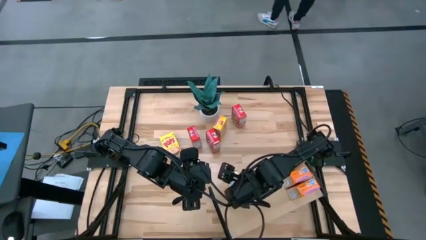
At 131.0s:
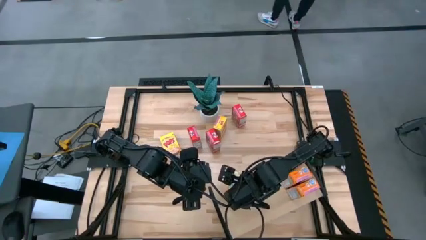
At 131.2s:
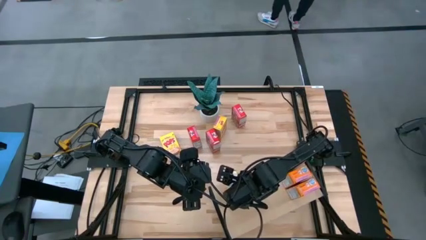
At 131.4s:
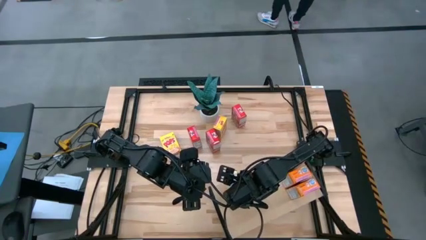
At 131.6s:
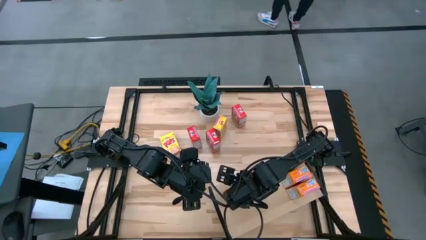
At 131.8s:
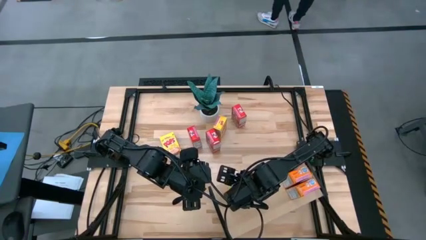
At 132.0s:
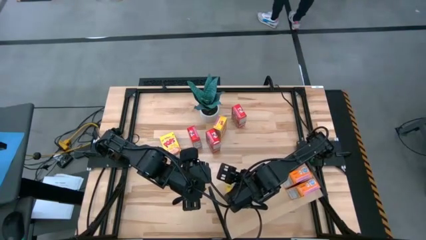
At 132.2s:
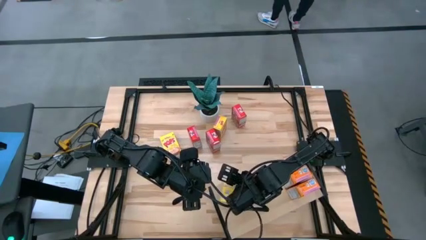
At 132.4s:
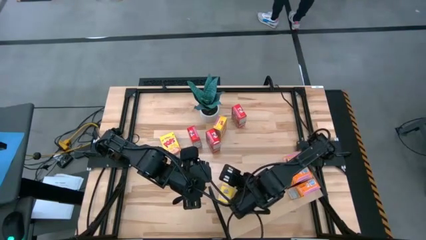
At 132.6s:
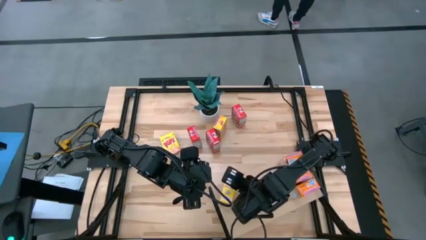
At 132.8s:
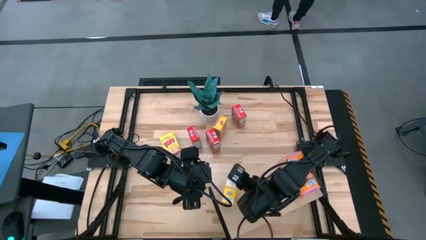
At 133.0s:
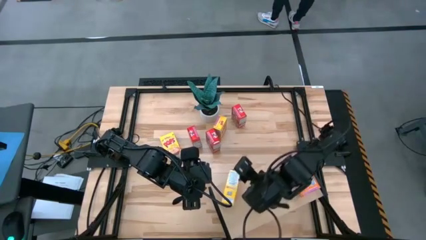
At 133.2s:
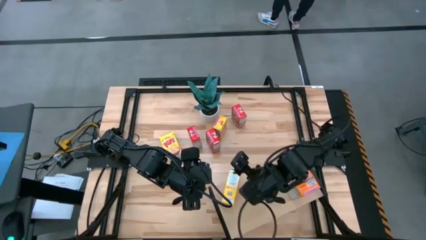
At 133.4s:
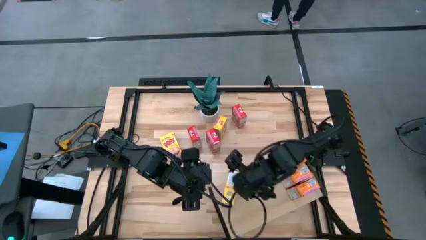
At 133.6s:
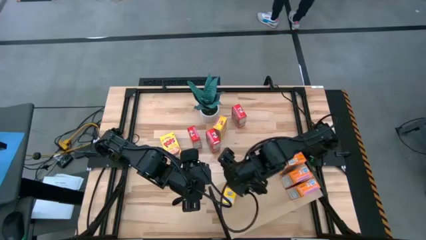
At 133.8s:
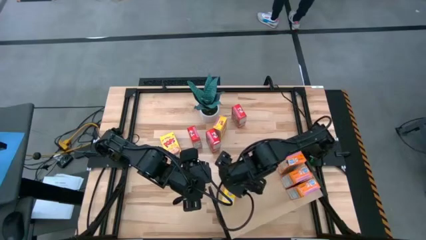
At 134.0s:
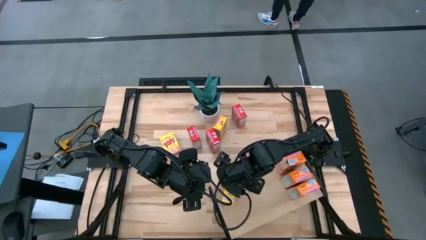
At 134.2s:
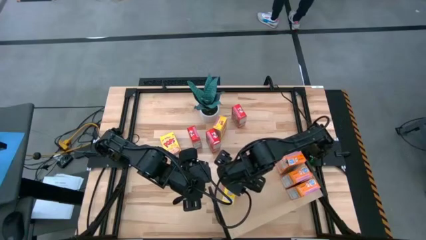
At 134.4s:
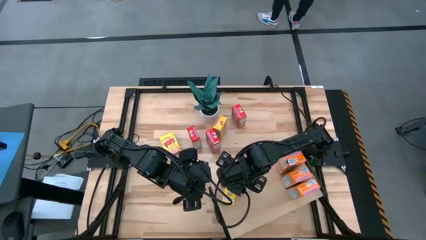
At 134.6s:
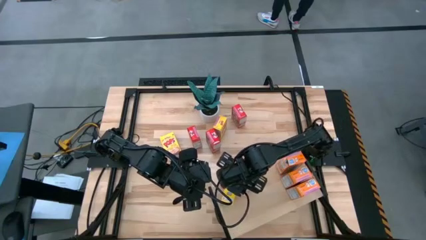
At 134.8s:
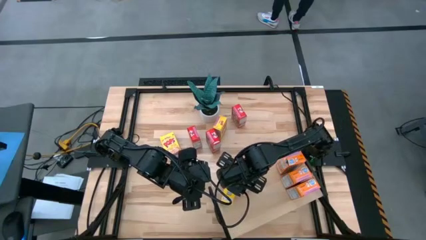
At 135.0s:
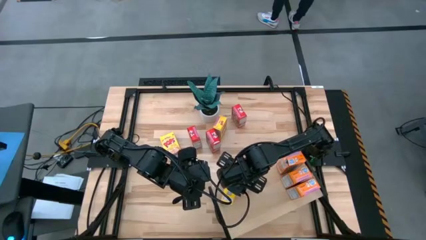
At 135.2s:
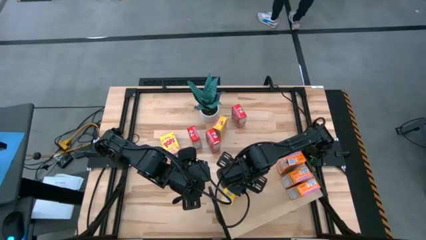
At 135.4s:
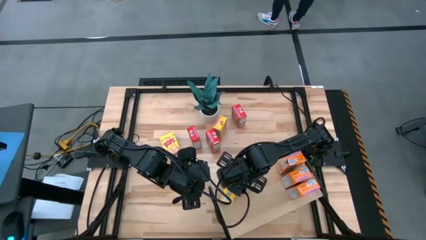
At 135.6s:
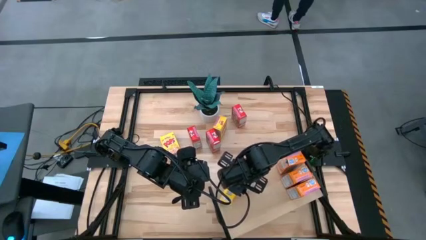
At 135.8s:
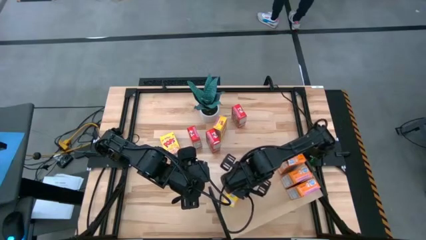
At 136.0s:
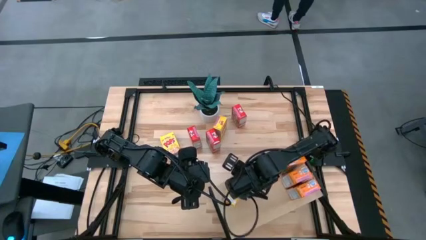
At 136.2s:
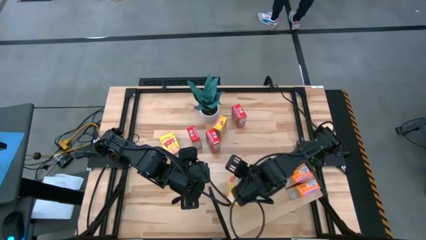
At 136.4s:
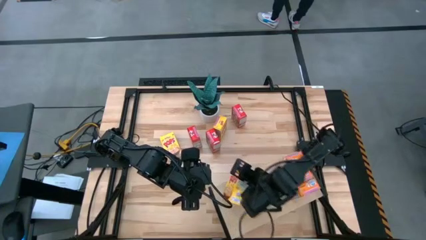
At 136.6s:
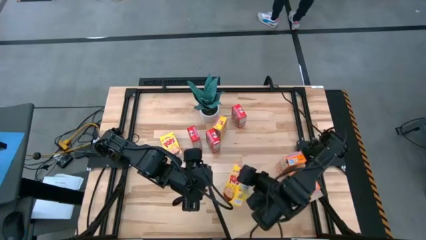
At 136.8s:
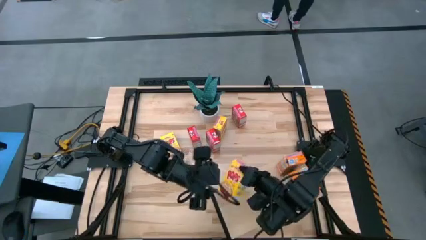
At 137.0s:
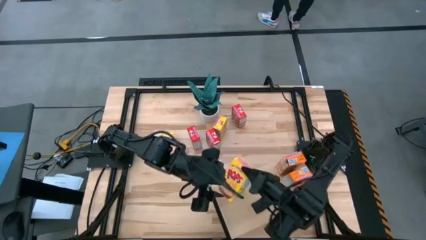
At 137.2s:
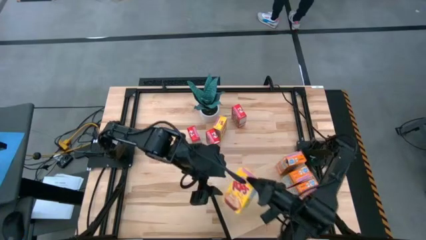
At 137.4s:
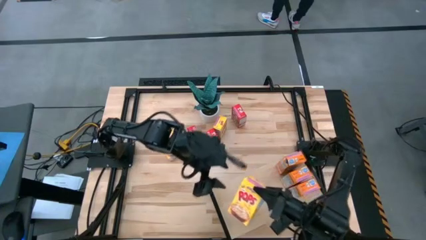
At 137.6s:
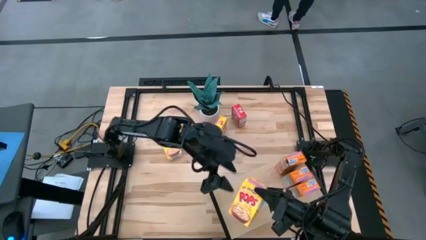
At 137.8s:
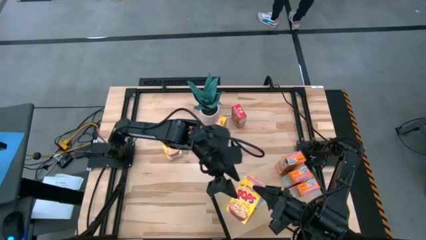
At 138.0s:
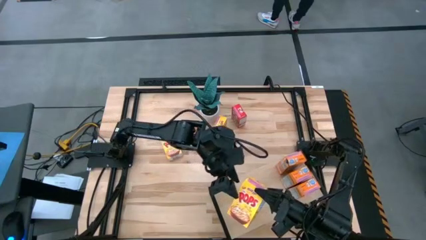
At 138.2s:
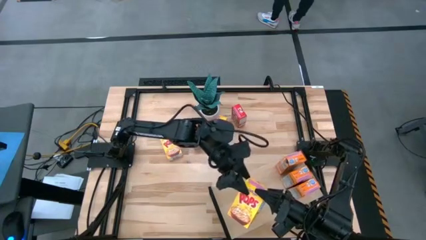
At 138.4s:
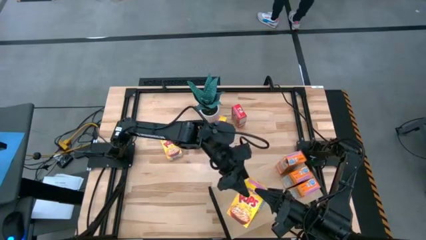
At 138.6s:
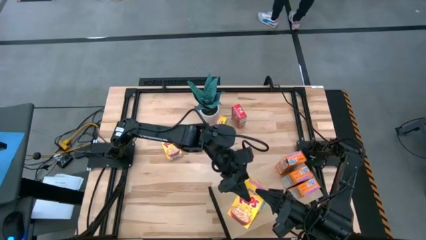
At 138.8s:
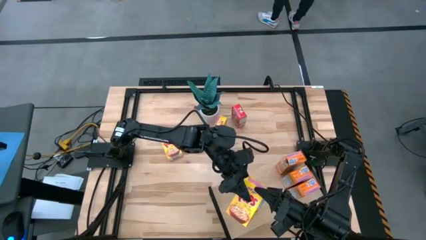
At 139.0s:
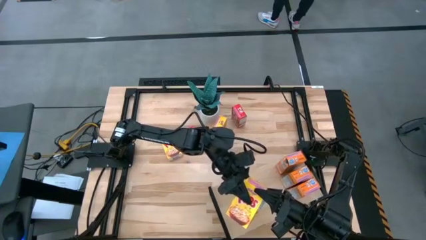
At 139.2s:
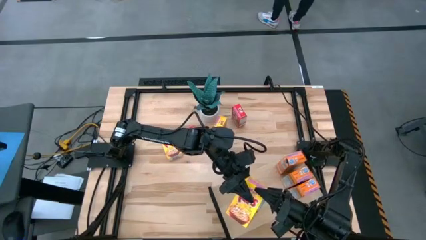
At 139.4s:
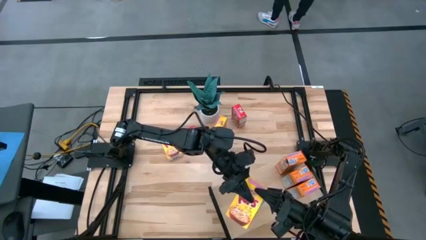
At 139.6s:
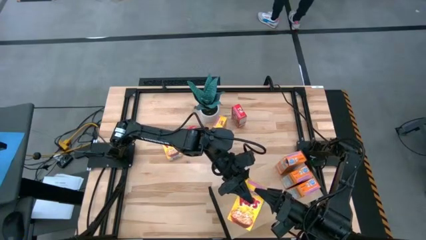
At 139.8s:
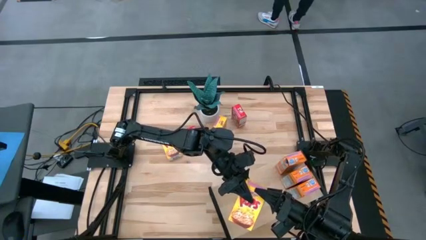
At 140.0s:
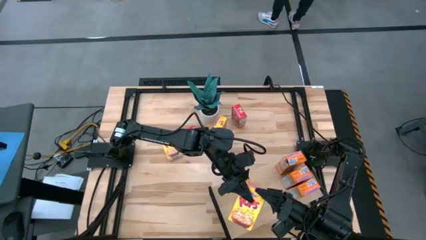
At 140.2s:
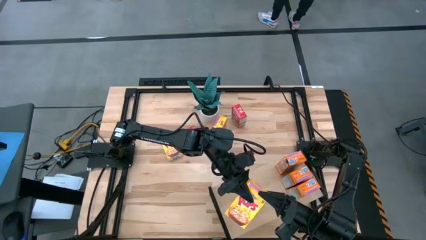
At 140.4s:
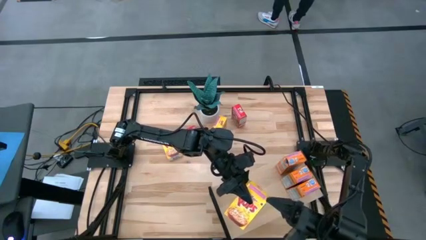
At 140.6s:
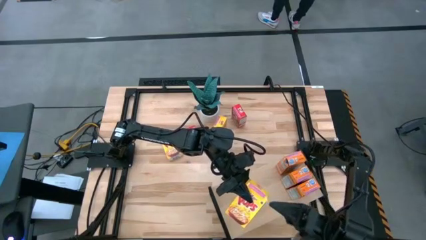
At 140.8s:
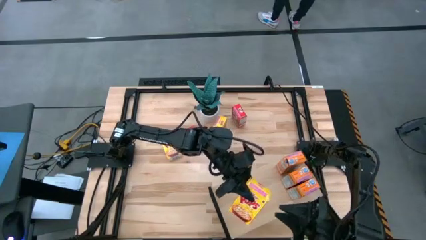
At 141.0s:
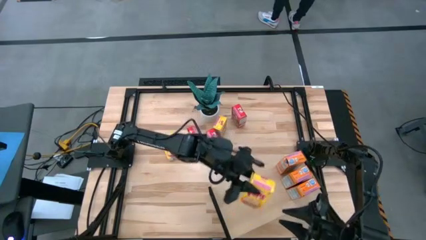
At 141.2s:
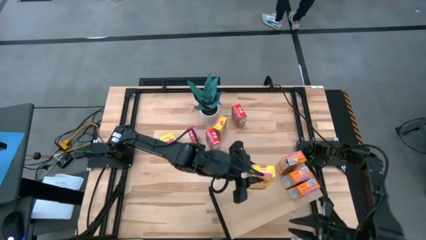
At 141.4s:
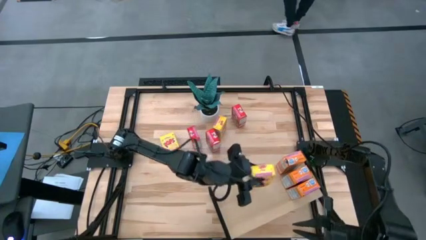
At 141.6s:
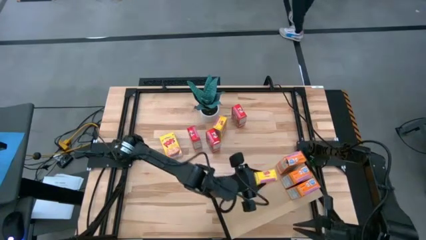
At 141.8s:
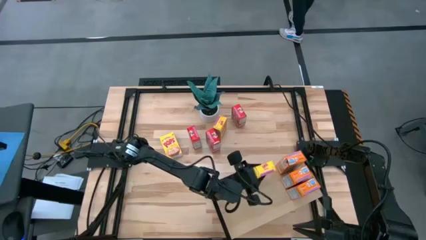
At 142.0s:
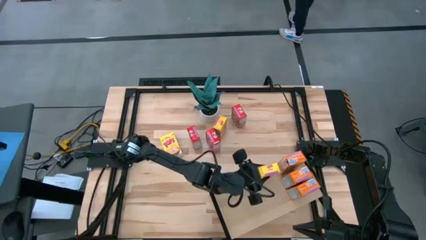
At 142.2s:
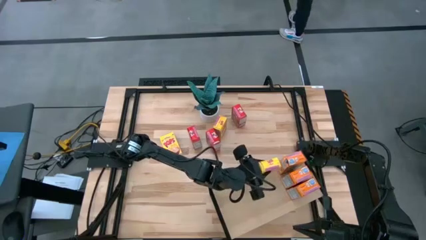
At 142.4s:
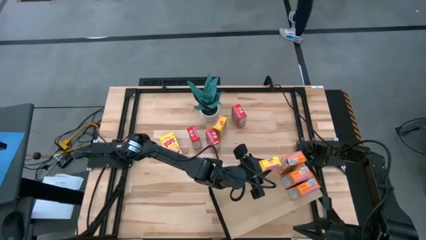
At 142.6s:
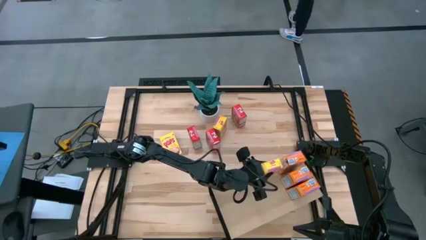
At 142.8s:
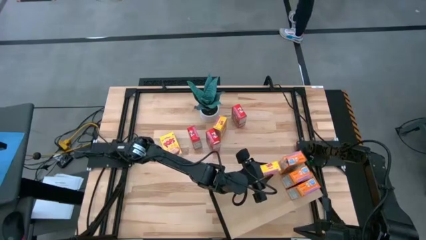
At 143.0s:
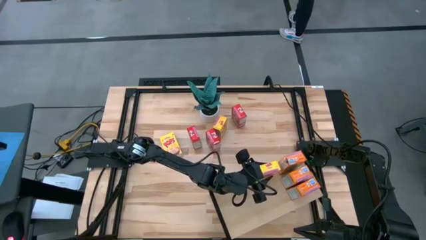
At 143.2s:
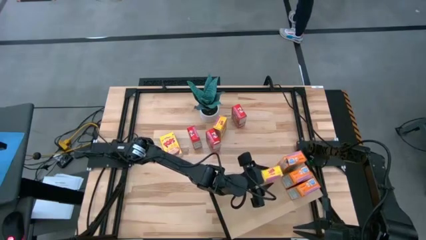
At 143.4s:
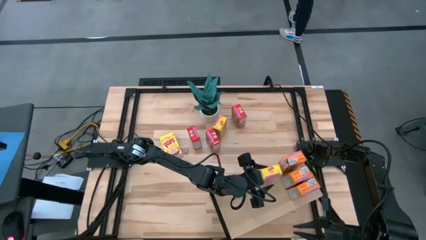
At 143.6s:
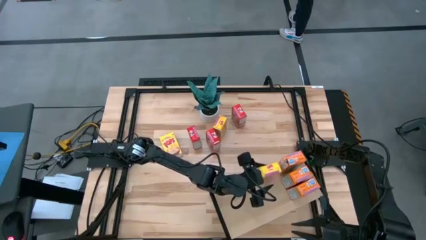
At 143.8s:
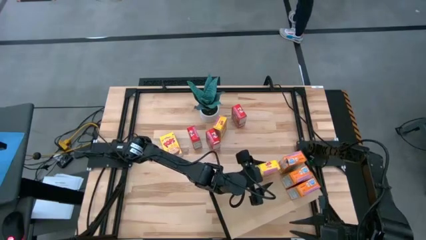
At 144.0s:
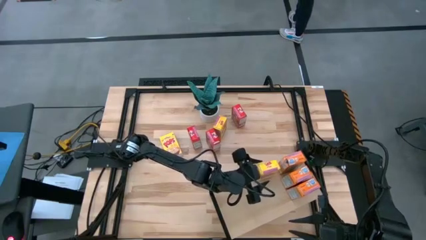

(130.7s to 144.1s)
Task: Stack cereal on shelf
Put the bottom right yellow cereal box on the shelf
